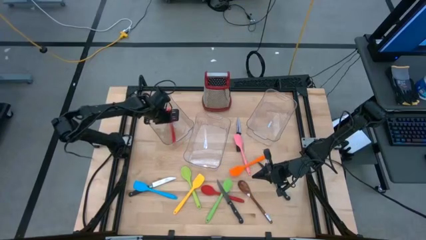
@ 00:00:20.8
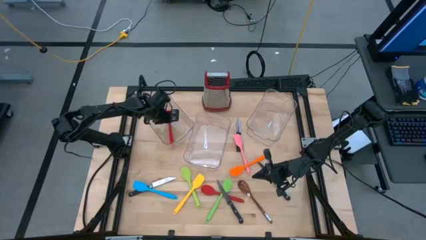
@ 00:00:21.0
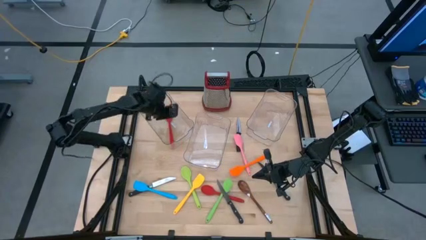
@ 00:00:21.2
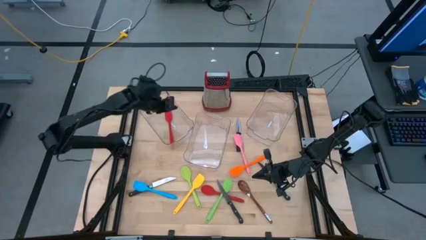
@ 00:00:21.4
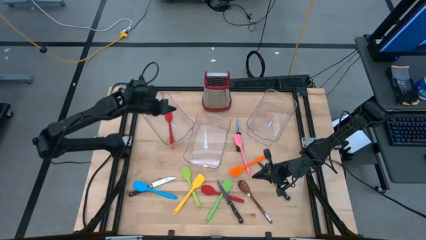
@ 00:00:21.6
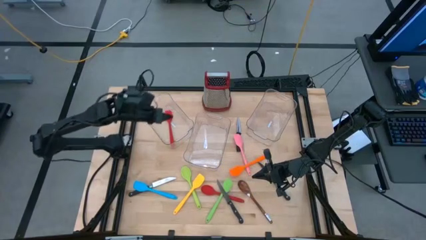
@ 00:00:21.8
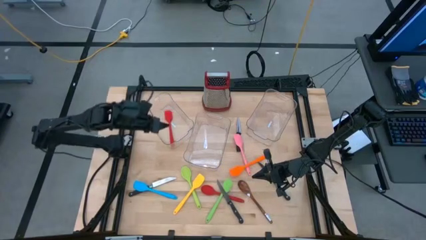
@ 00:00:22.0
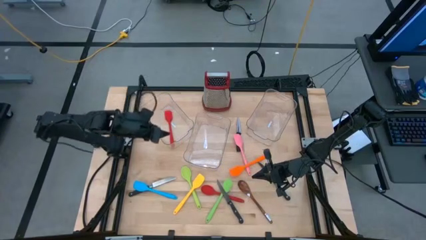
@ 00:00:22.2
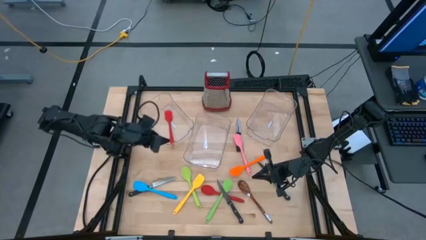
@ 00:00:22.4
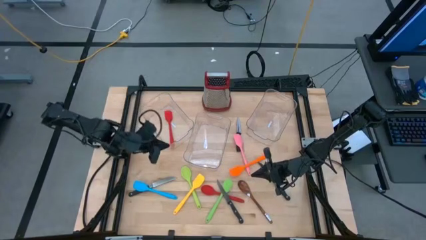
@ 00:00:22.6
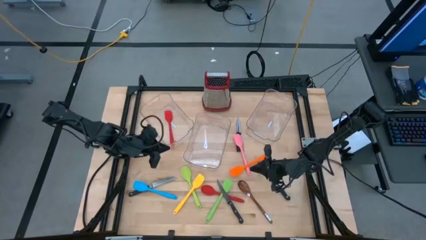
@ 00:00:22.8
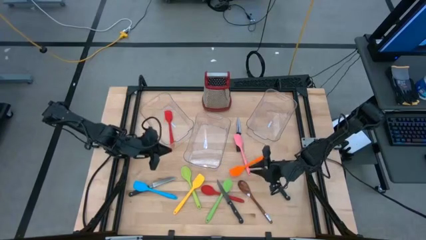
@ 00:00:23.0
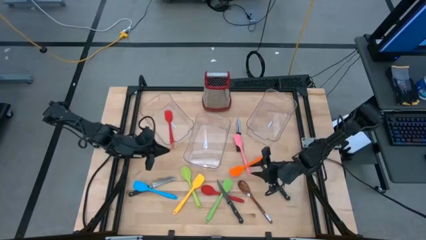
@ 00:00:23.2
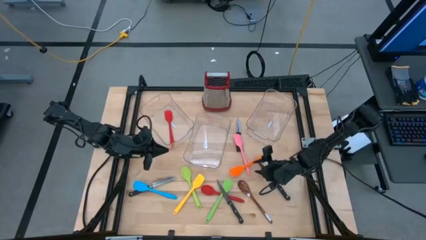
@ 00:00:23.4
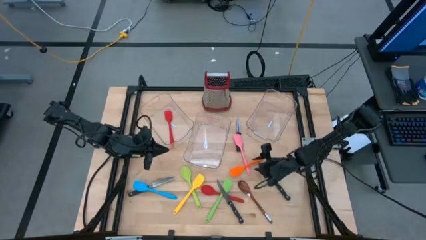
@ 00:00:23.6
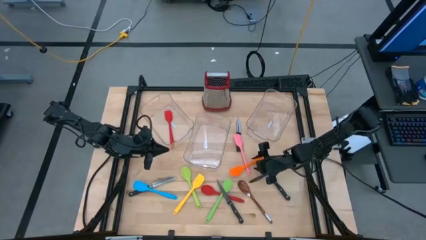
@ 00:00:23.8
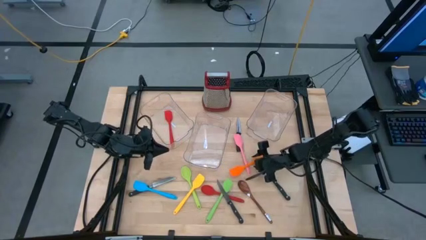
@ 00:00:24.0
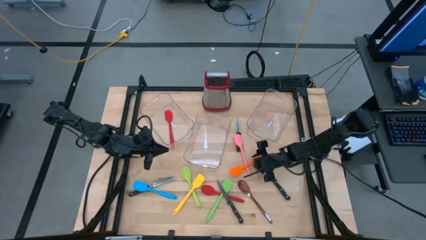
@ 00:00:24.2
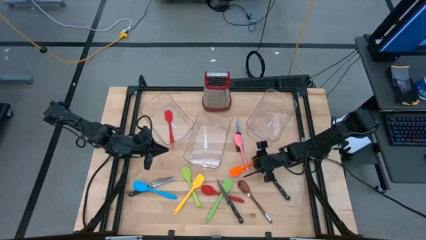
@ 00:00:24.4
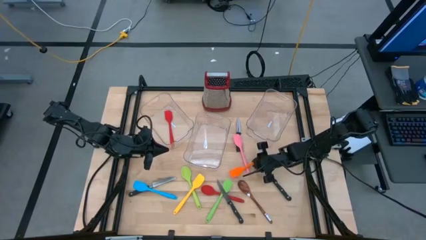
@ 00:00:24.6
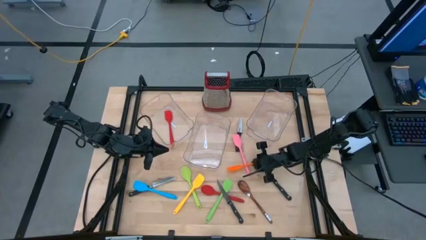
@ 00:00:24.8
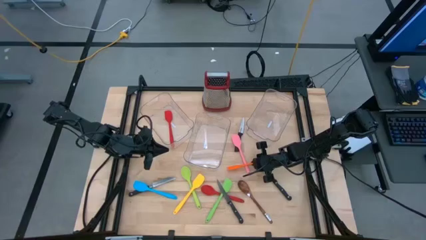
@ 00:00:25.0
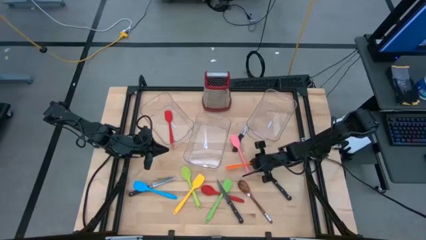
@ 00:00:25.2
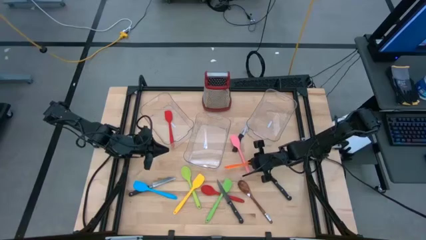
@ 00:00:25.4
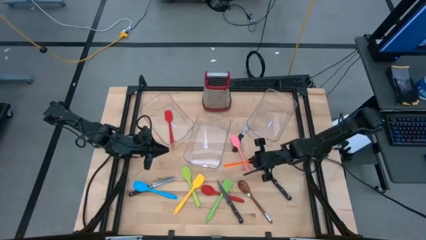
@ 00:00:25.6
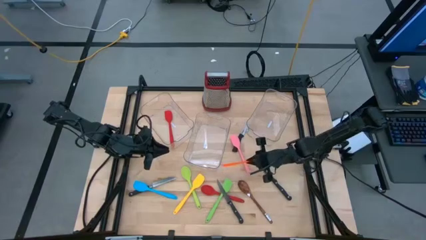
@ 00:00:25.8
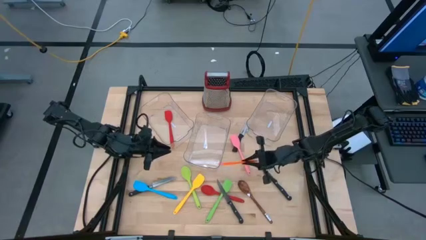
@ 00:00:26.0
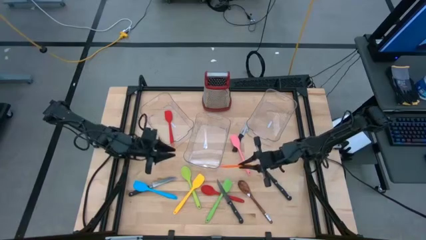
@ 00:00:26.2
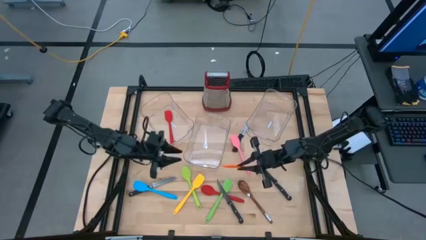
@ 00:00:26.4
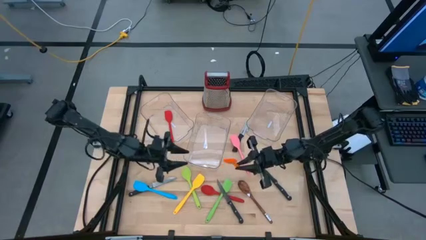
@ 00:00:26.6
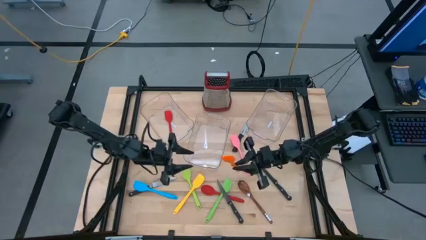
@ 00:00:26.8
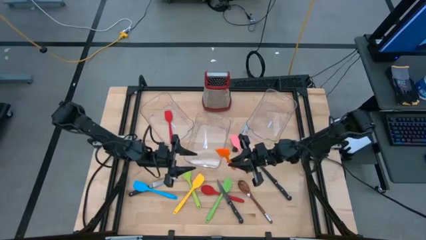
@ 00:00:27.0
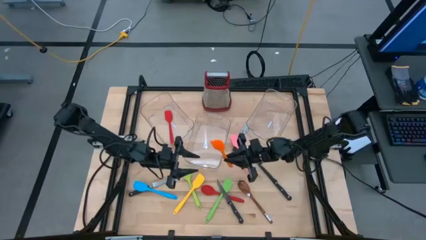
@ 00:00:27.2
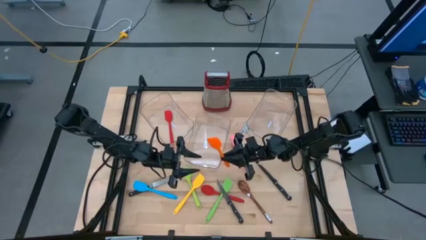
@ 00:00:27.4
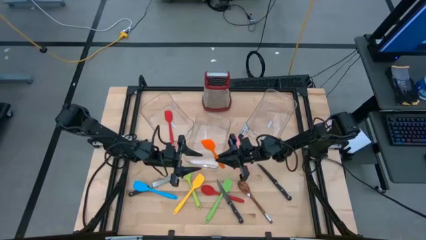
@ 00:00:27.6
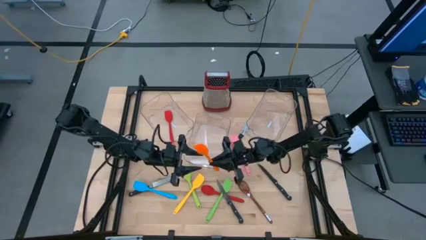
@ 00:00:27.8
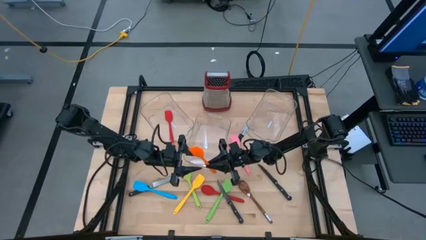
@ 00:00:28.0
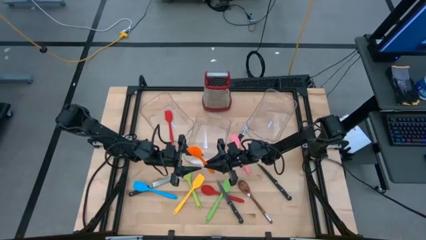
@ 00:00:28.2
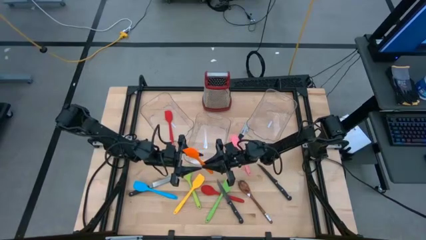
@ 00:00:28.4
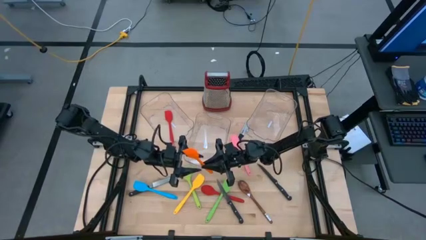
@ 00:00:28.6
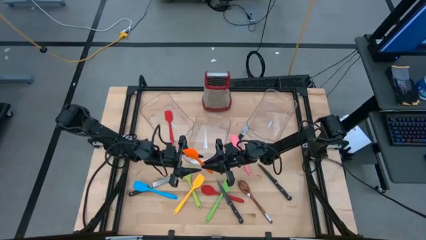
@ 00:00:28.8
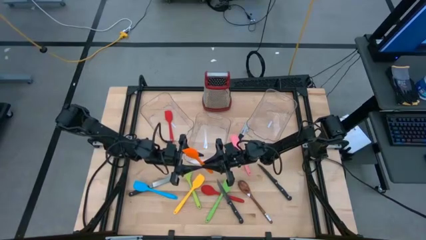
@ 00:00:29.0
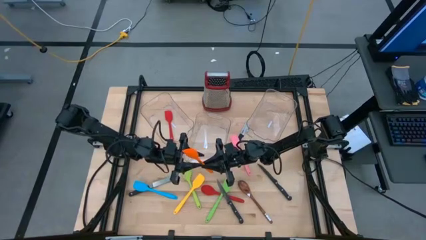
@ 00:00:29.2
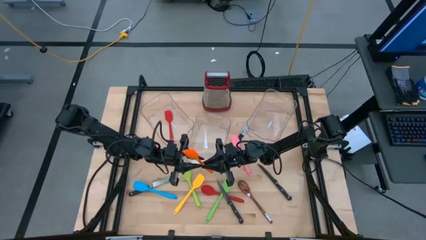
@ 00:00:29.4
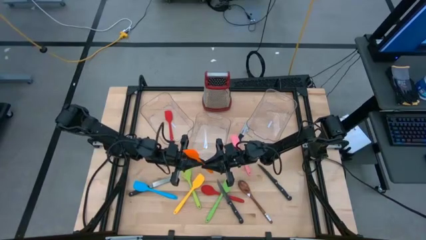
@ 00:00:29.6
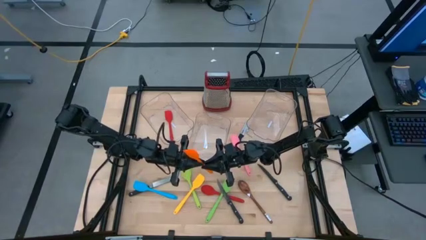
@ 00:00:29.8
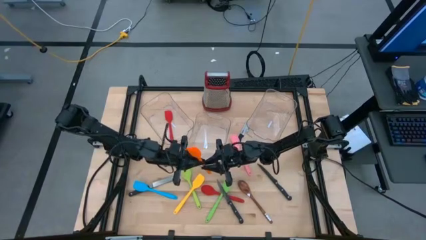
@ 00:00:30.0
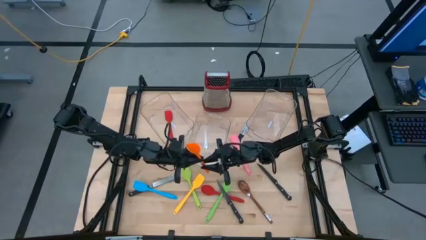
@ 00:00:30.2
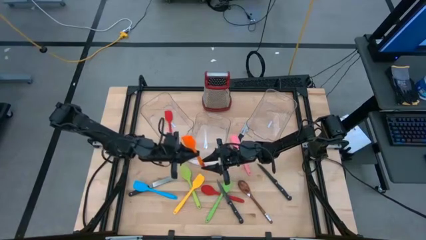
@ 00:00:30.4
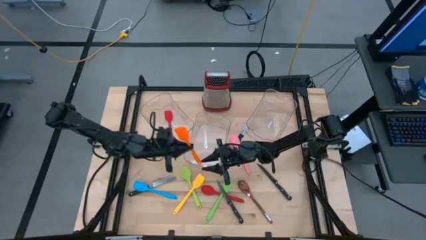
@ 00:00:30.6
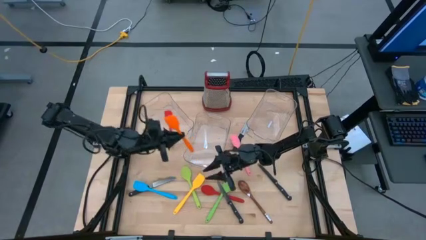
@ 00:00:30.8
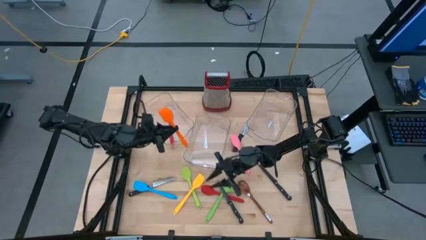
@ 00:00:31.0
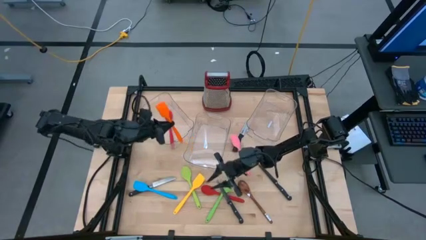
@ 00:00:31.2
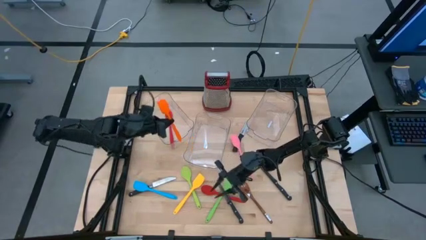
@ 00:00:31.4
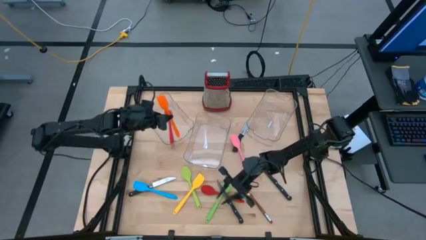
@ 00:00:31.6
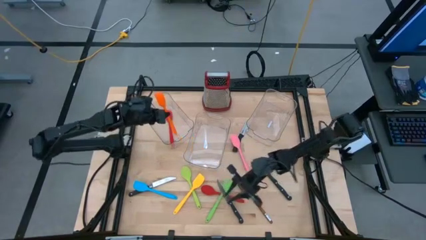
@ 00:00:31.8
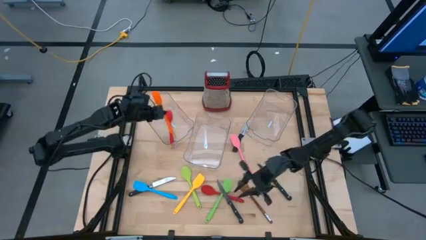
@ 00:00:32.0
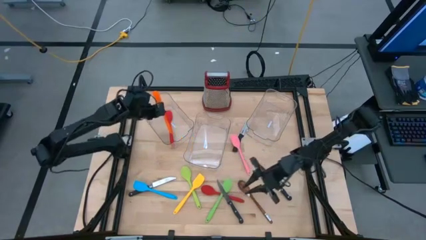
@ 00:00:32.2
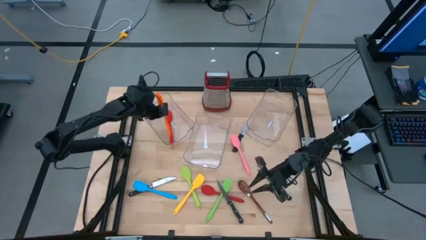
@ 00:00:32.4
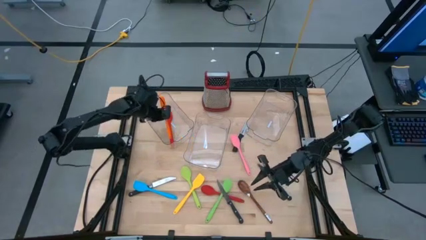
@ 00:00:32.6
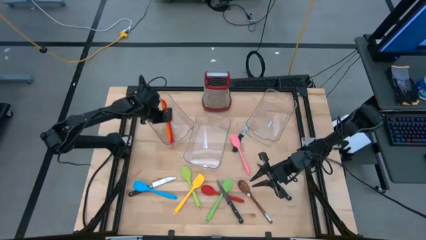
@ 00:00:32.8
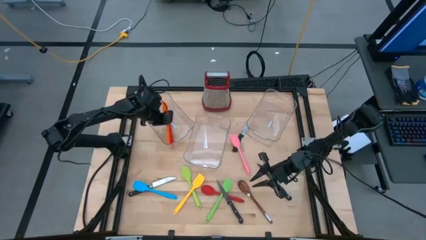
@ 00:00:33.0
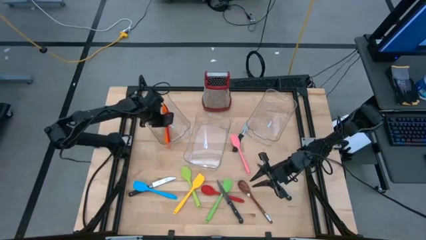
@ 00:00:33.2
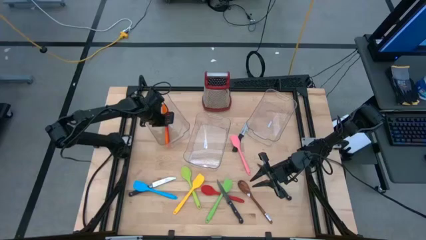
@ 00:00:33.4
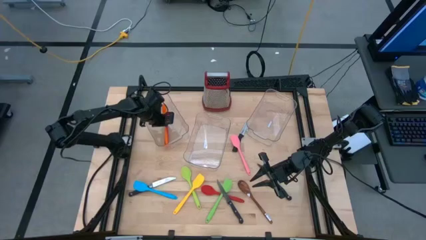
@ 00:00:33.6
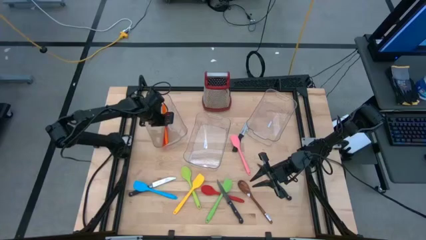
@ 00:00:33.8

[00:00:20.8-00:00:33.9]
Task: Pick & Place Kitchen Items
Put the orange spatula into the left transparent bin
